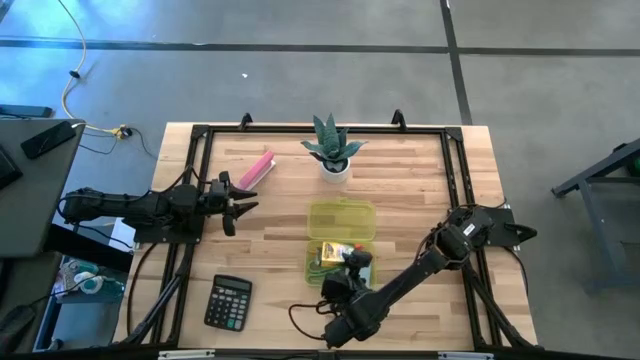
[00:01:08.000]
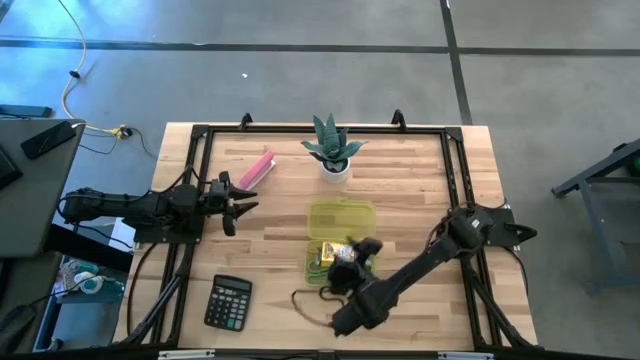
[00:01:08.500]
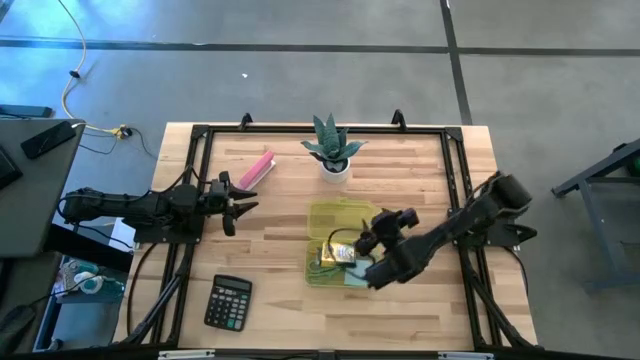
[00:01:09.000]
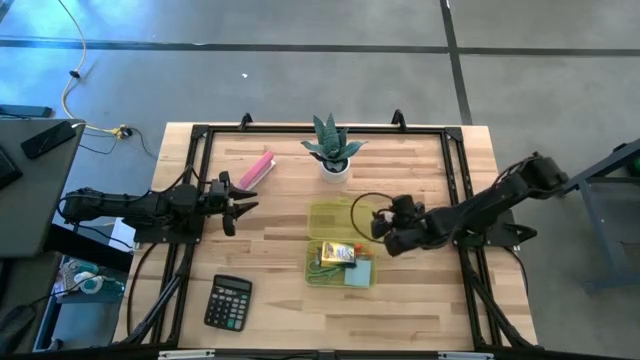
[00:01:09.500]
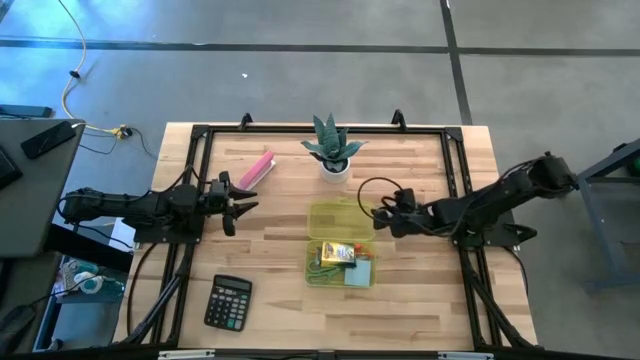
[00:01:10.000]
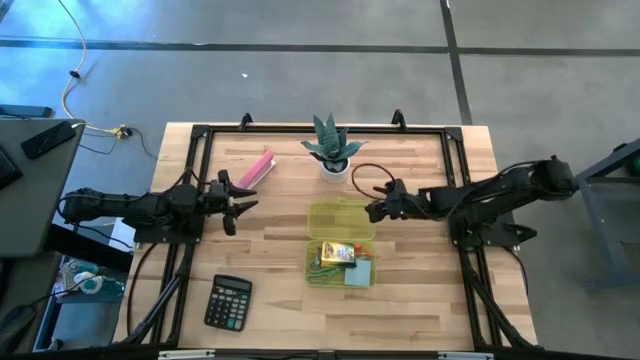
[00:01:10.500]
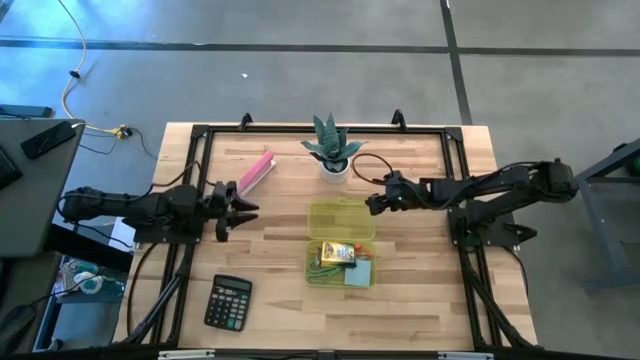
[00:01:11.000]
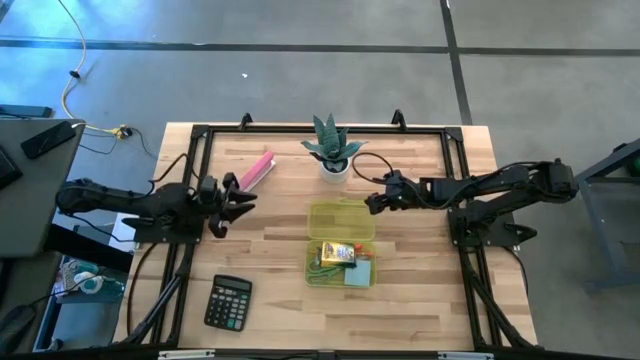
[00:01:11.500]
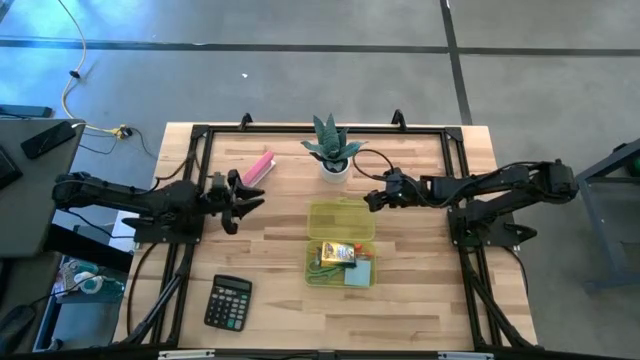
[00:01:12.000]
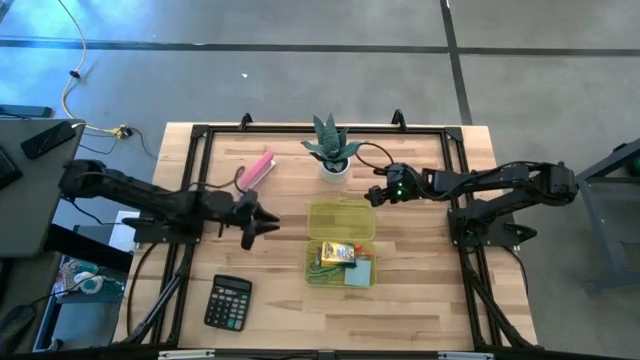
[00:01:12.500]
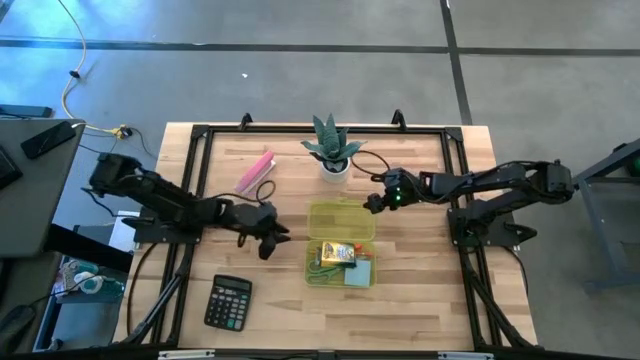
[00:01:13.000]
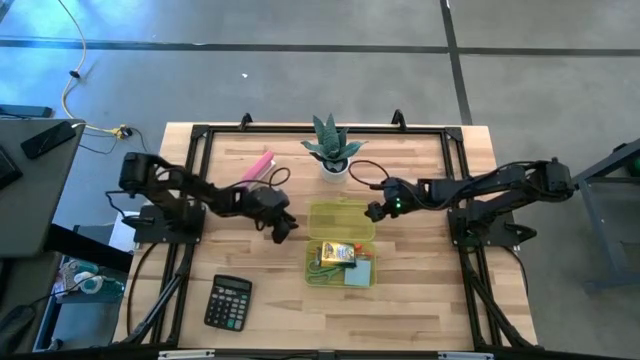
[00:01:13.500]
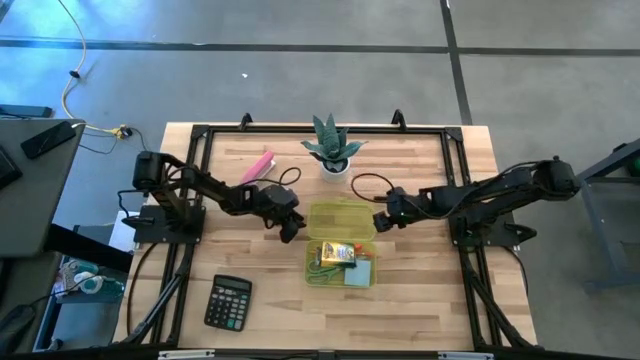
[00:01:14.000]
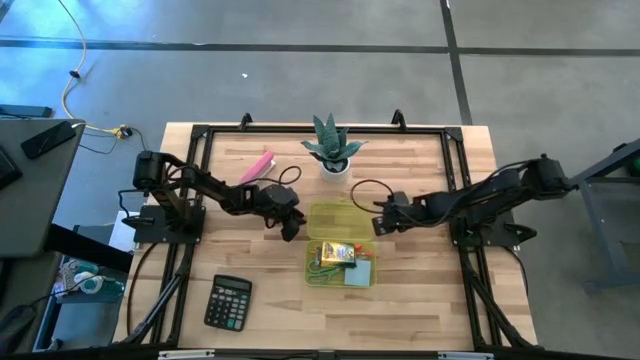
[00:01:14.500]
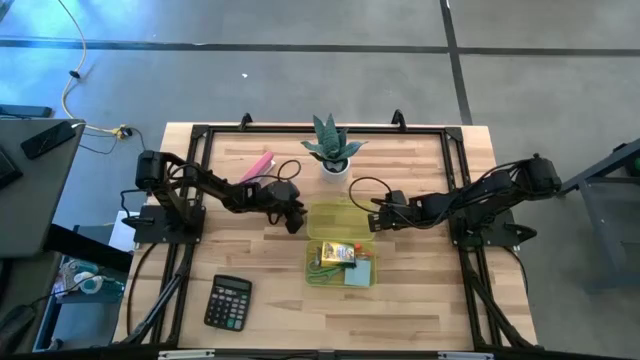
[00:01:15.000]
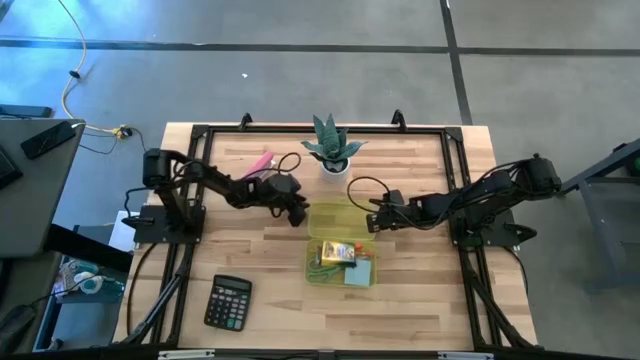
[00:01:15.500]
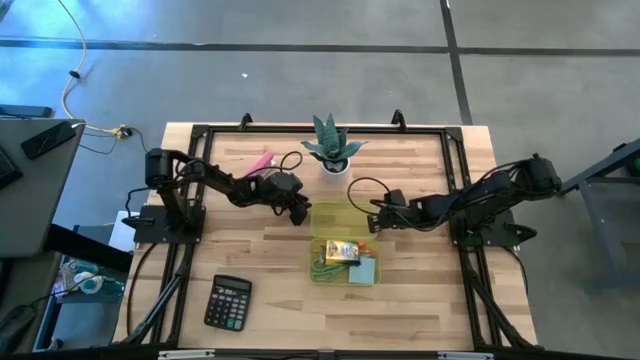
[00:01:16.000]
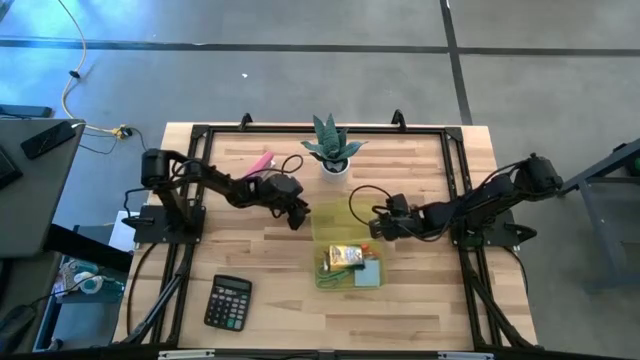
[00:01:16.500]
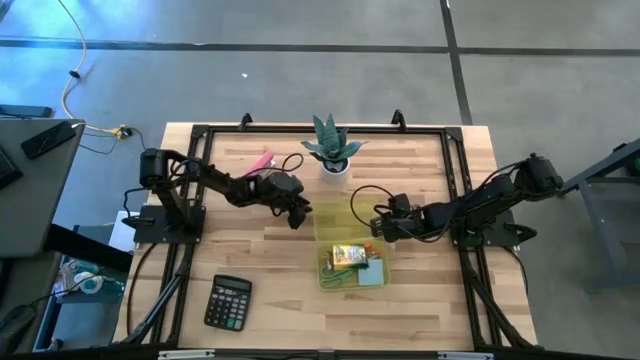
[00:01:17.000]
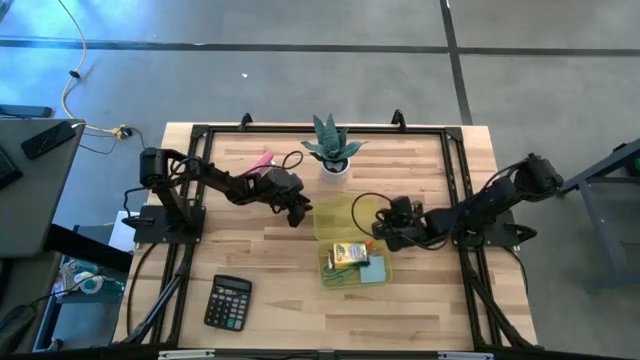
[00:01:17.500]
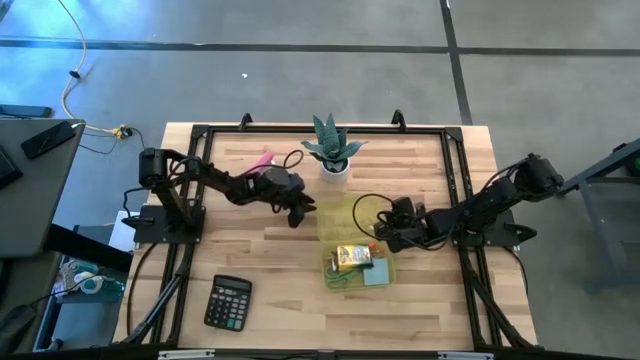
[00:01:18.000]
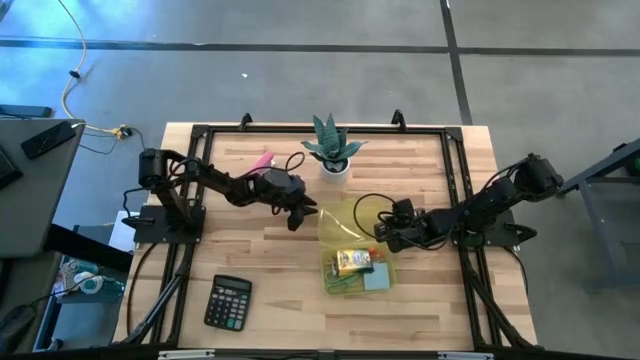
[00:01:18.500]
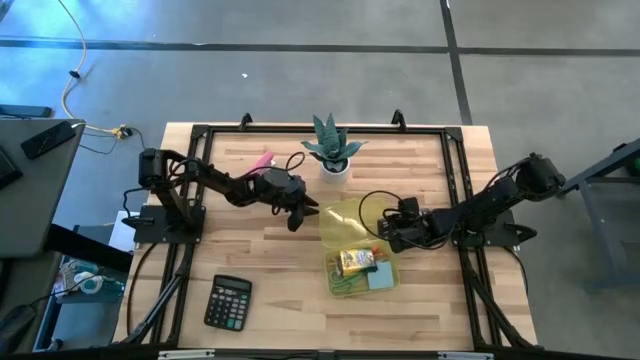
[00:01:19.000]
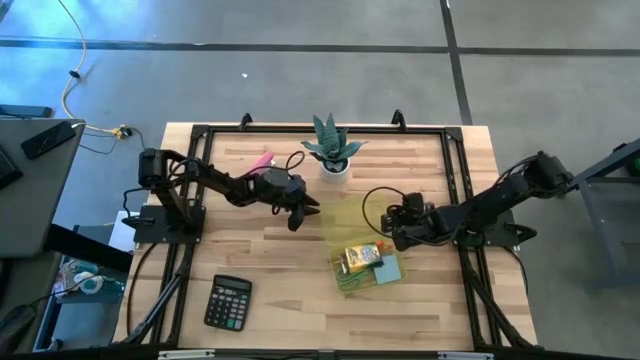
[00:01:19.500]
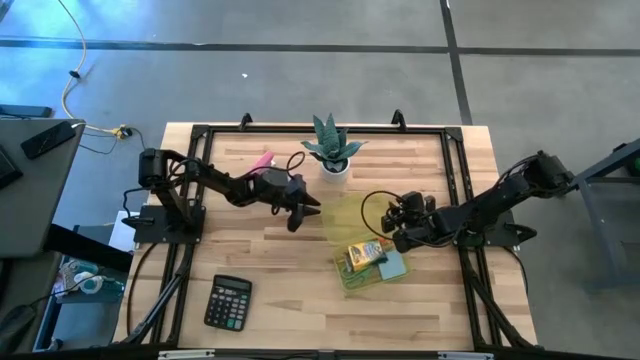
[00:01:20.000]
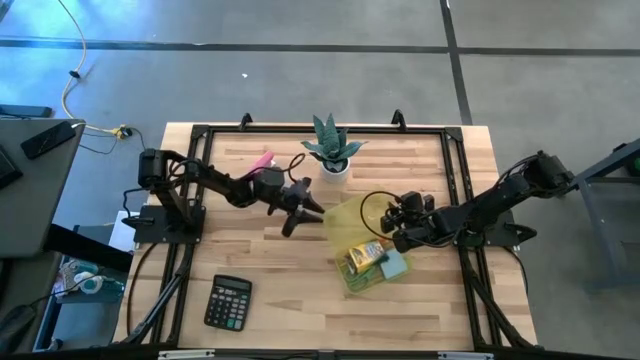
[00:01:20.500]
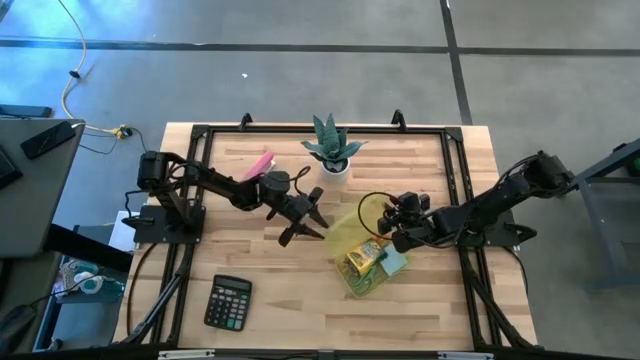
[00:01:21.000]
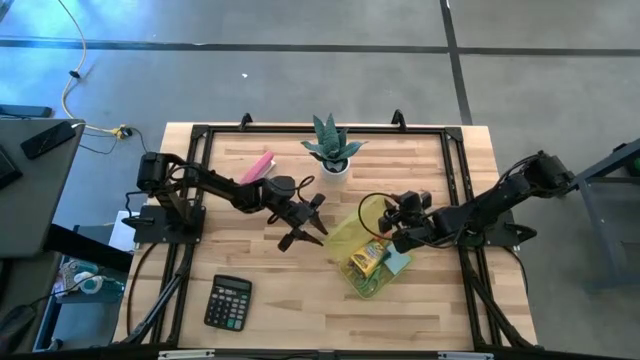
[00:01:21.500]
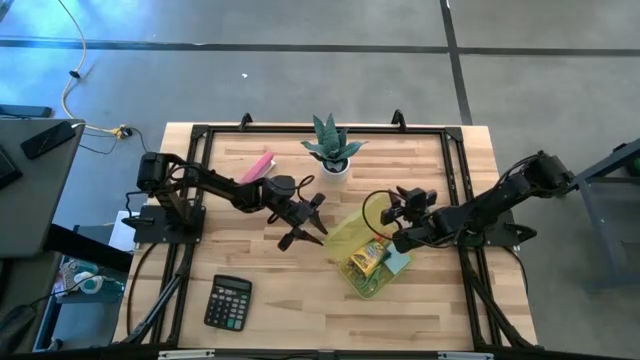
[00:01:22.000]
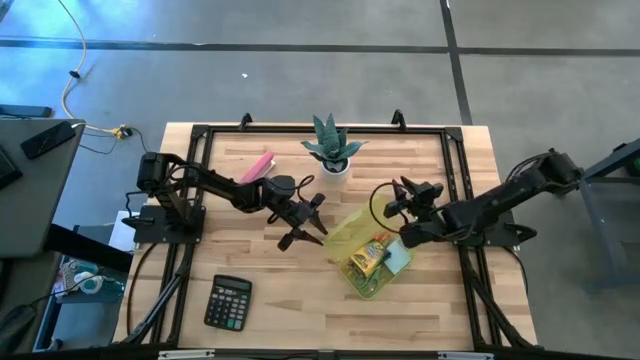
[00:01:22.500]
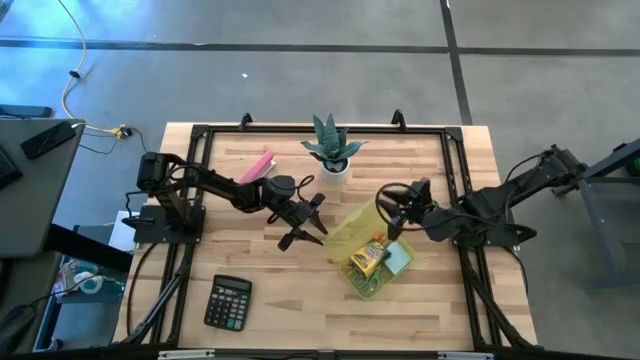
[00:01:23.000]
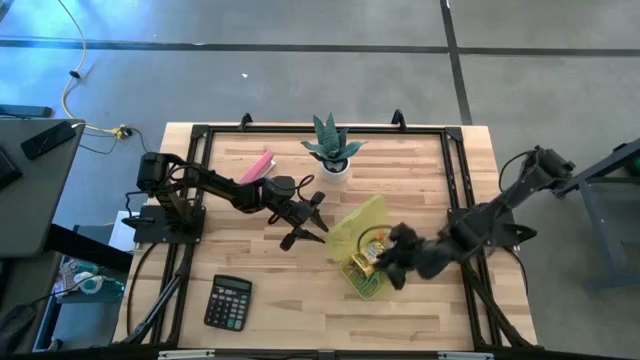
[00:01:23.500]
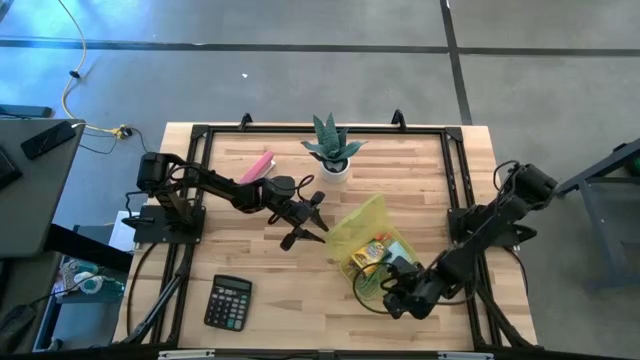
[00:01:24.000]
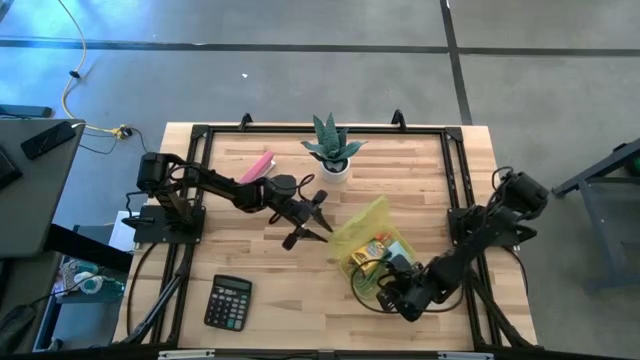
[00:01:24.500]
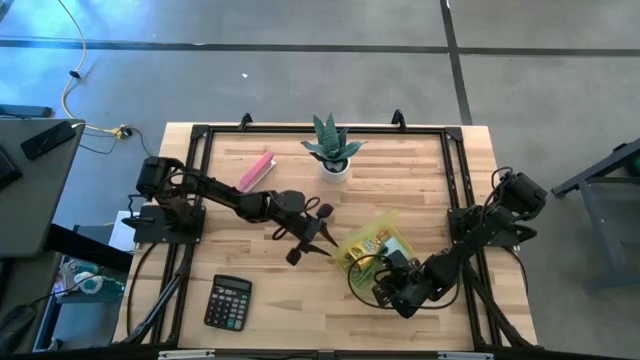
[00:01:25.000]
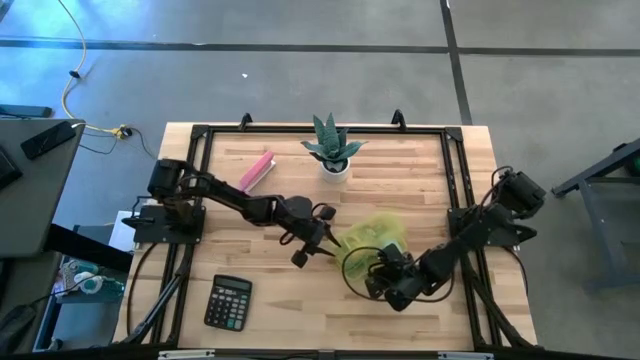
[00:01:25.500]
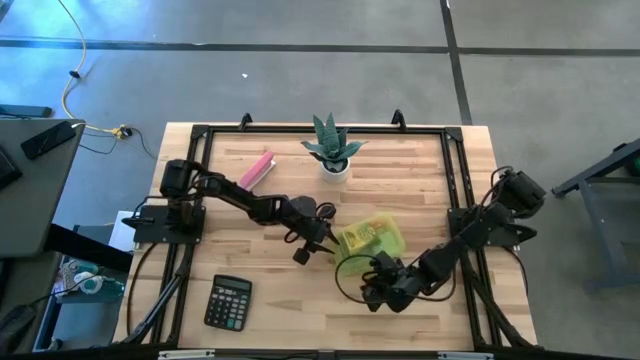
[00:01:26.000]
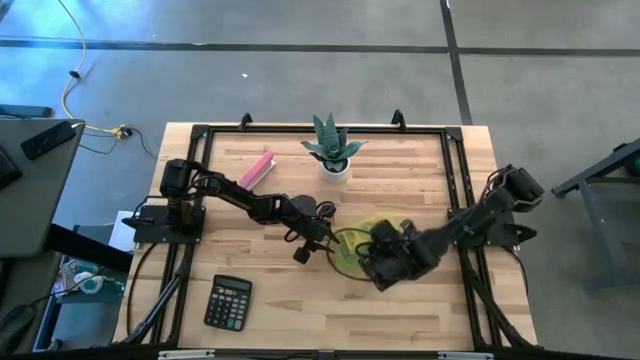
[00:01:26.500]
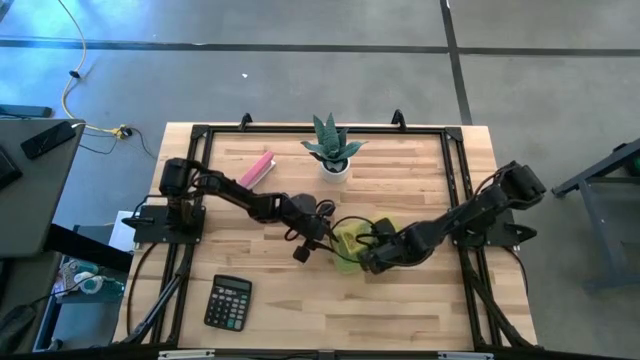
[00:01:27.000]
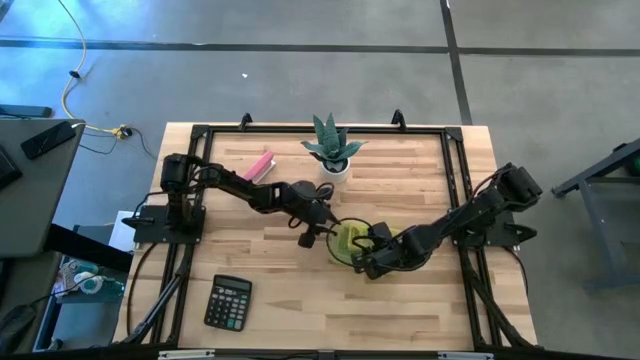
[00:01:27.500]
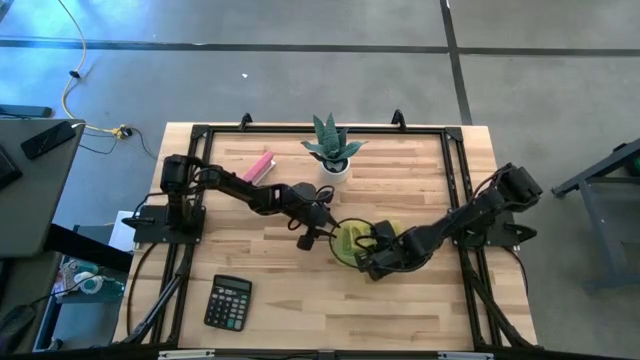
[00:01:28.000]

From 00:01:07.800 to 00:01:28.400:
Task: Pack school essentials
Close the supply box
